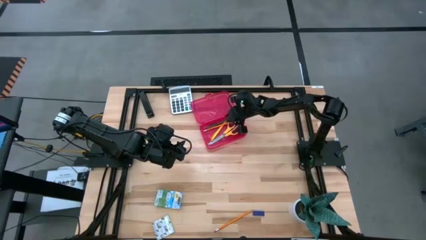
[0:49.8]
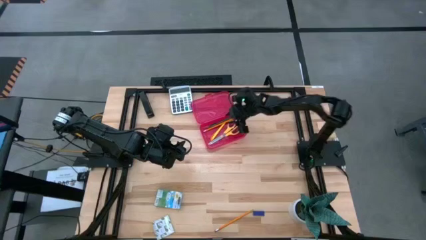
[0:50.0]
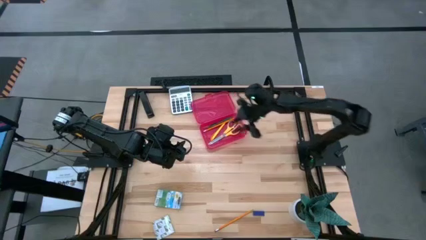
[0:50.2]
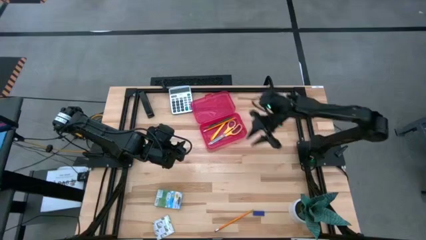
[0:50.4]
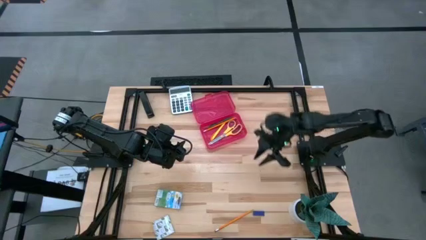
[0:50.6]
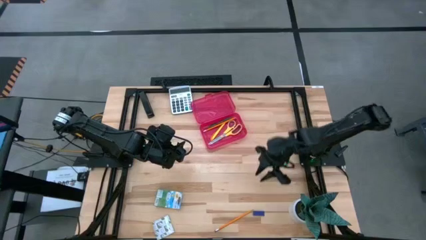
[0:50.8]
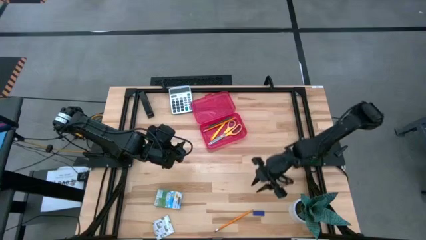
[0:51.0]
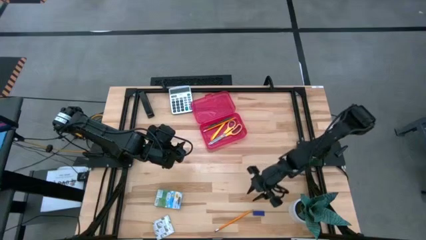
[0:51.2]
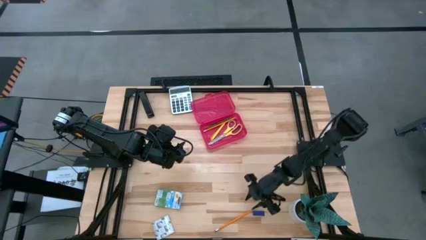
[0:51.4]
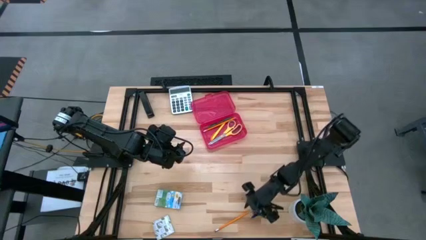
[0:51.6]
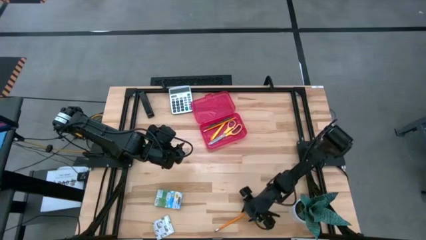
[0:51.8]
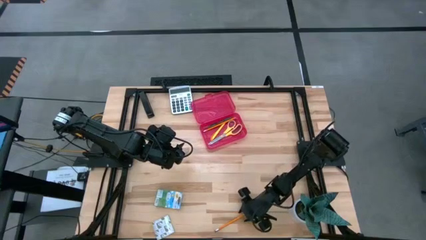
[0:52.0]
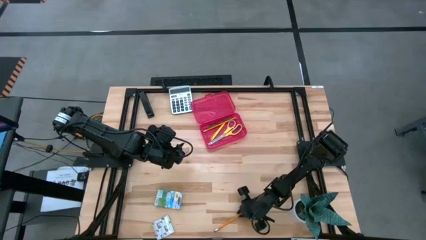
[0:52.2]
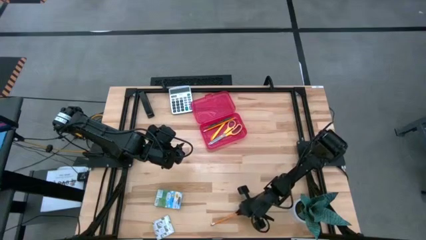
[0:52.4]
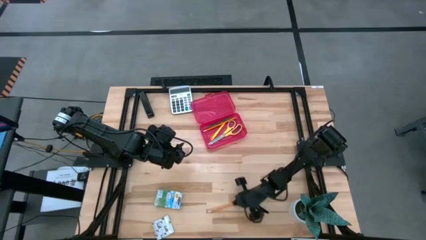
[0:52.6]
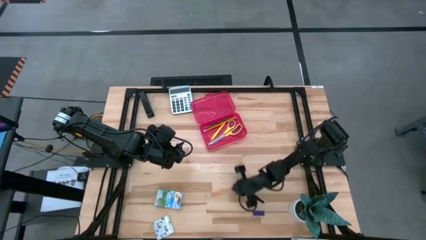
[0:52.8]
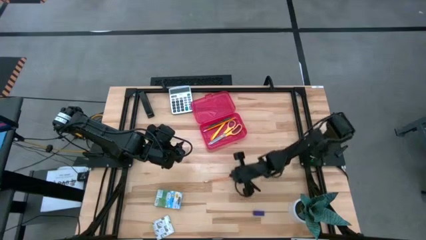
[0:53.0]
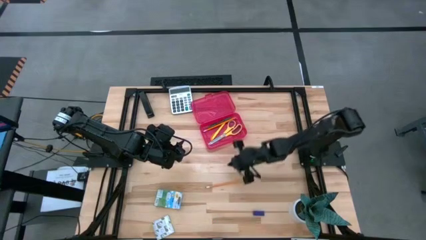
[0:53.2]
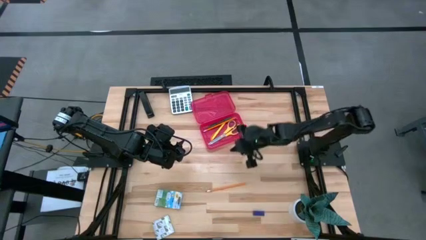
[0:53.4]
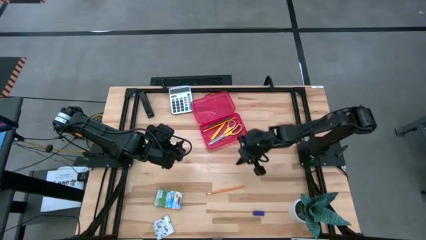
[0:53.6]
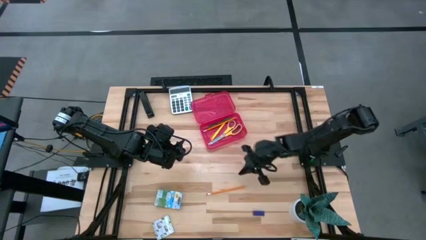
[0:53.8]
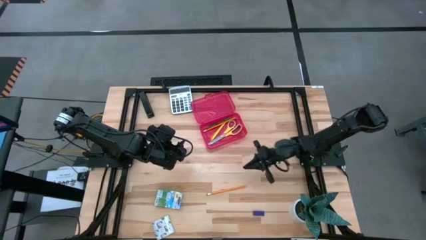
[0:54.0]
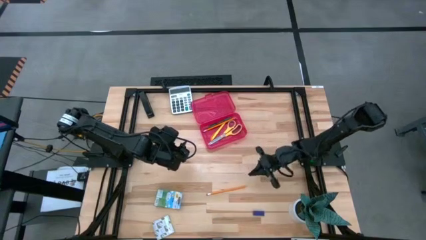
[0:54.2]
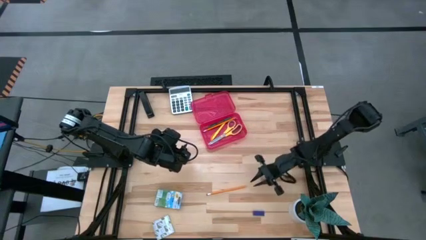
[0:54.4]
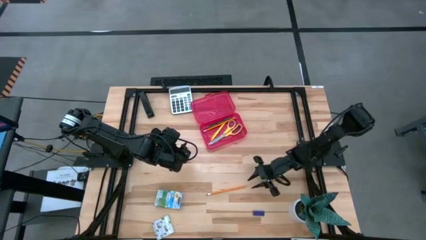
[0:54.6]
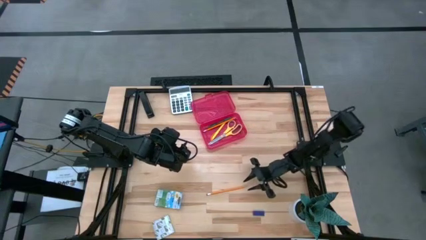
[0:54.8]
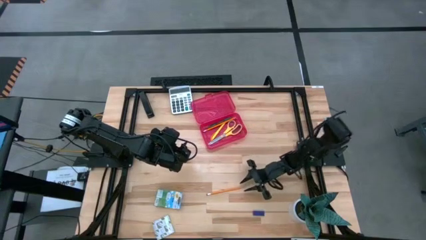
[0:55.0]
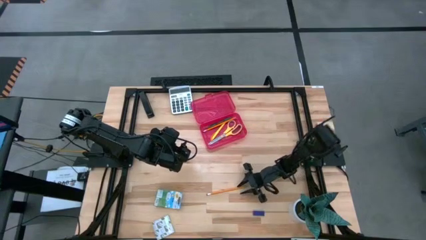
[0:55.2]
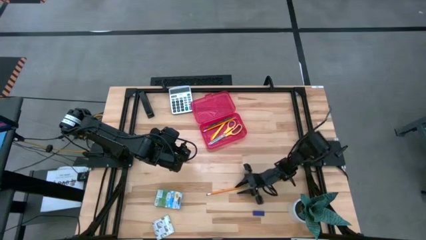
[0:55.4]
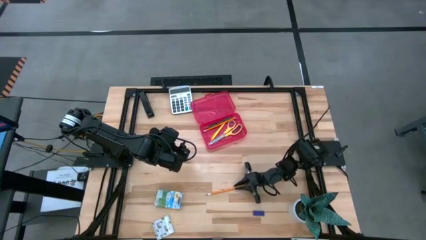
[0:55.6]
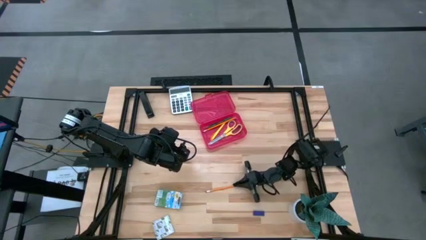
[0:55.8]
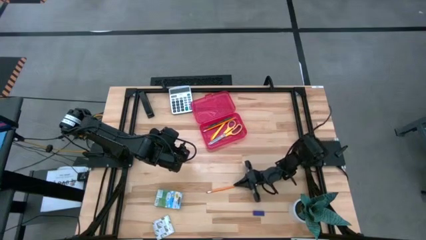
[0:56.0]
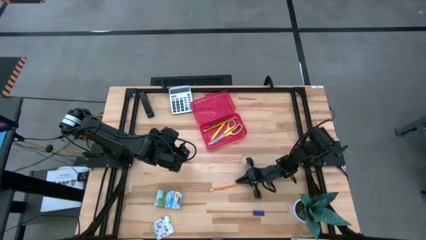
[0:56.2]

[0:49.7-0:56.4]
Task: Pack school essentials
Put the orange pencil into the red supply box

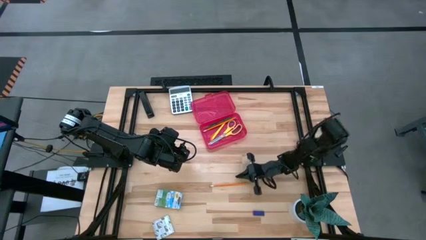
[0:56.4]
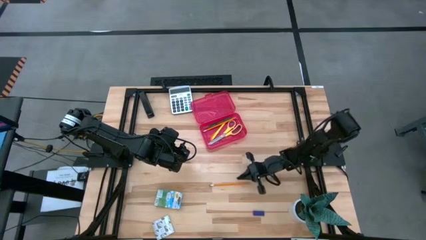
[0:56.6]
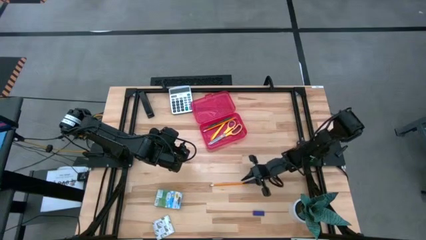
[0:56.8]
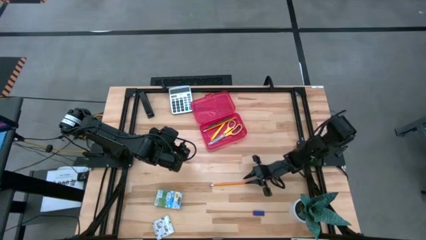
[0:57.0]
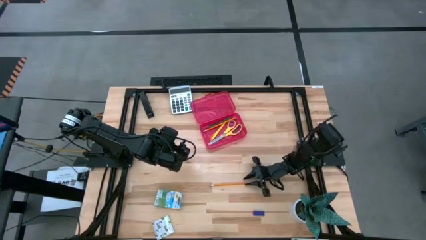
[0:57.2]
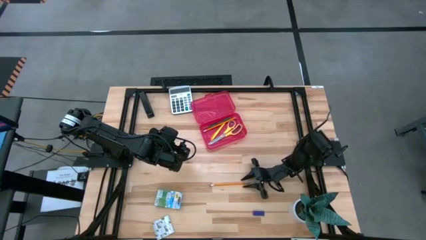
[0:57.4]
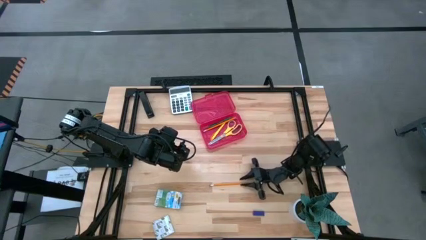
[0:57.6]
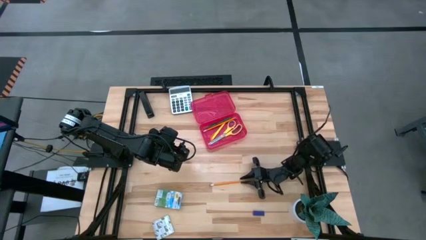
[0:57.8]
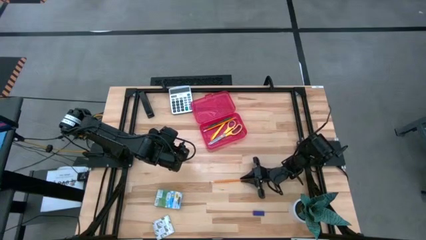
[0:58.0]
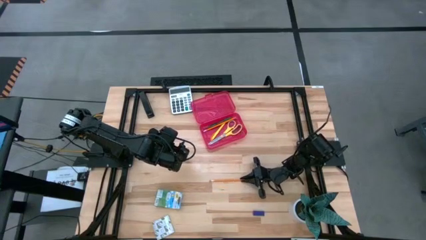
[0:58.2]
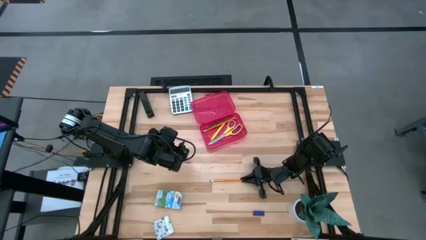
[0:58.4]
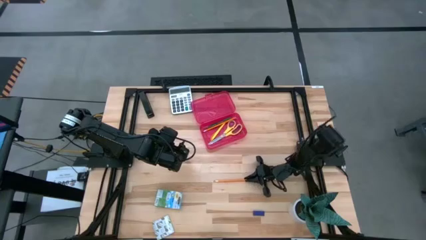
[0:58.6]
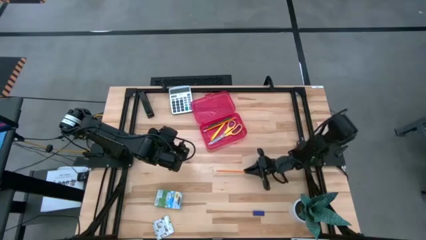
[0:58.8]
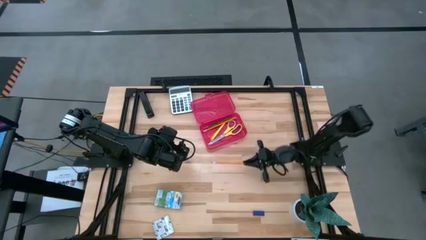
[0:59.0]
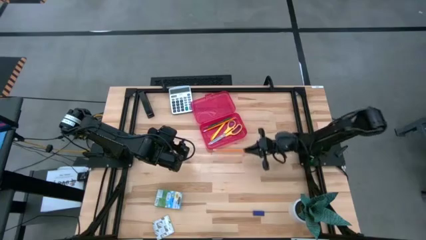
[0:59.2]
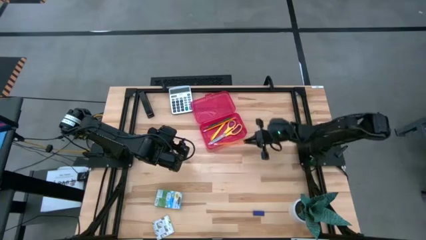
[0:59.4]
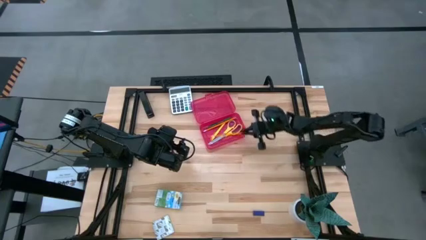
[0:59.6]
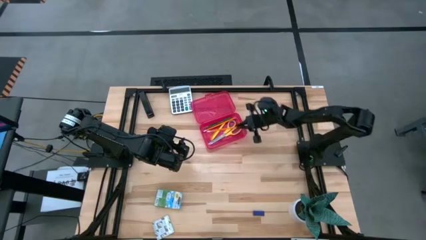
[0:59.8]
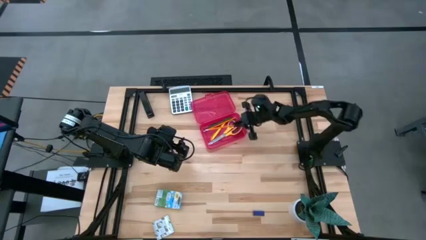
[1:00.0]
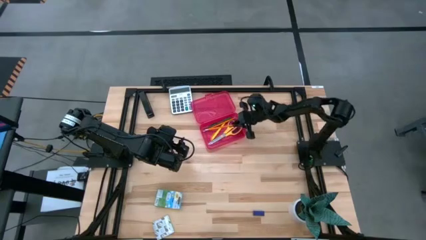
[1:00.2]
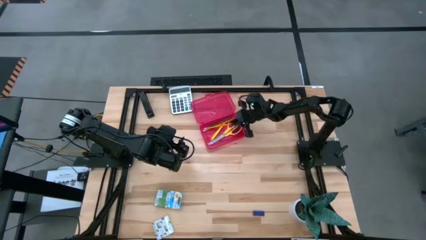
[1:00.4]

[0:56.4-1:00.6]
Put the orange pencil into the red supply box

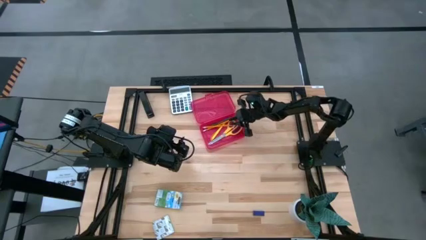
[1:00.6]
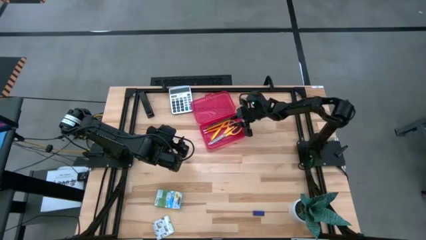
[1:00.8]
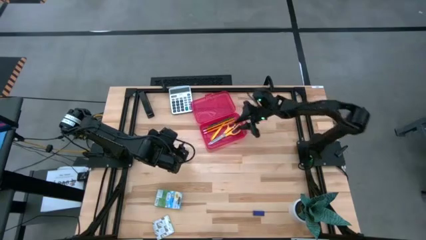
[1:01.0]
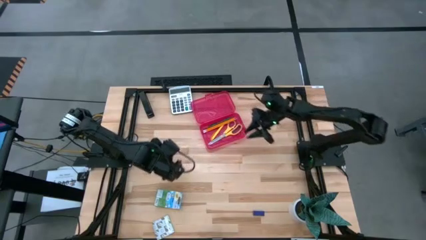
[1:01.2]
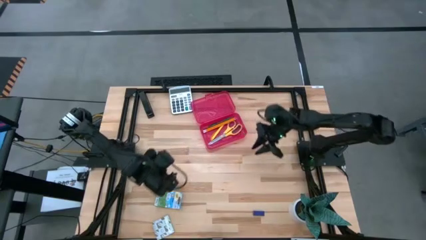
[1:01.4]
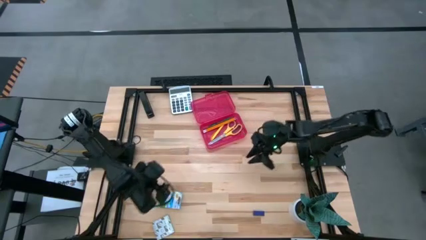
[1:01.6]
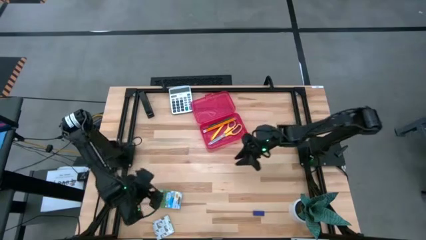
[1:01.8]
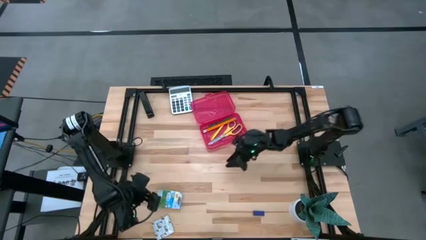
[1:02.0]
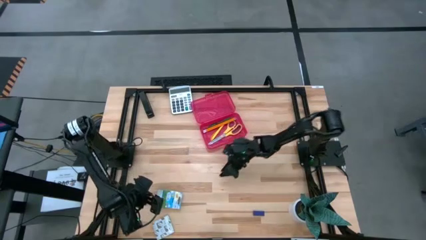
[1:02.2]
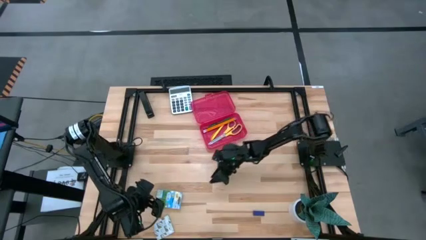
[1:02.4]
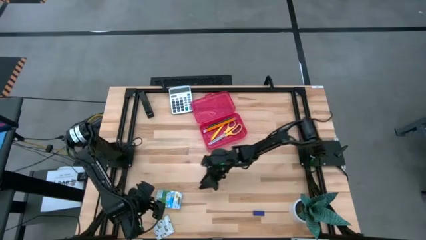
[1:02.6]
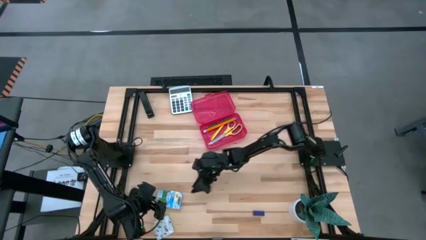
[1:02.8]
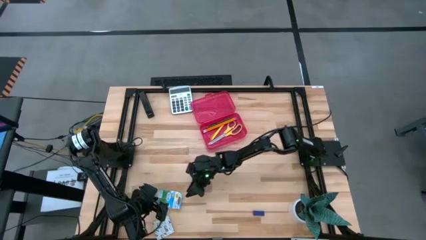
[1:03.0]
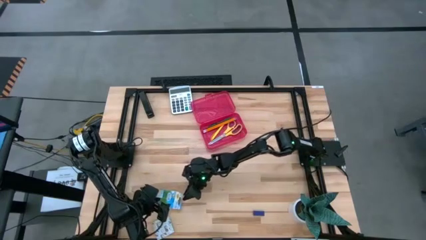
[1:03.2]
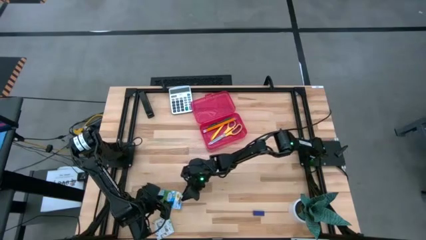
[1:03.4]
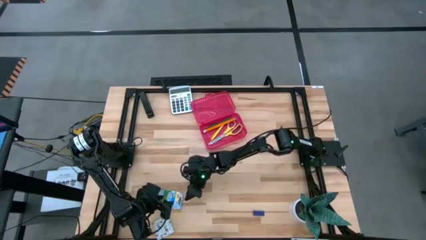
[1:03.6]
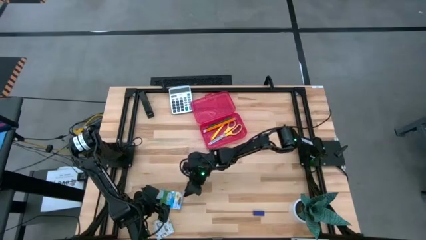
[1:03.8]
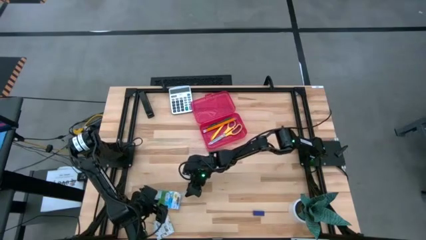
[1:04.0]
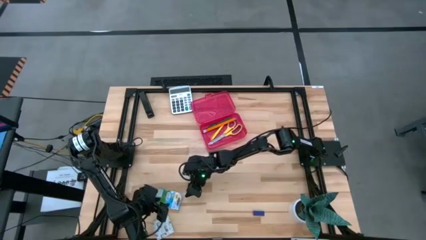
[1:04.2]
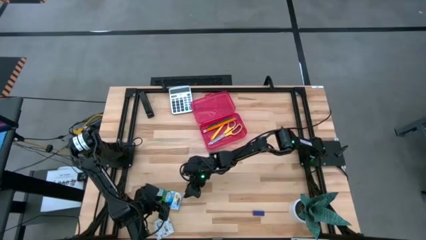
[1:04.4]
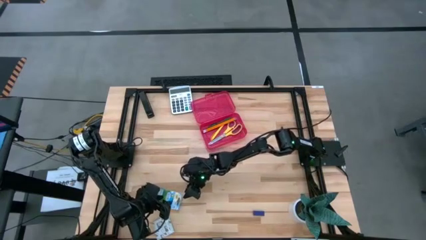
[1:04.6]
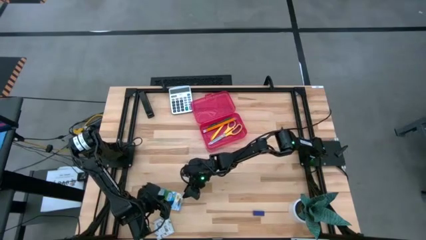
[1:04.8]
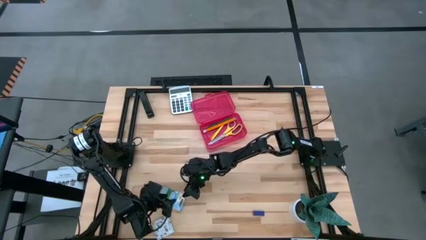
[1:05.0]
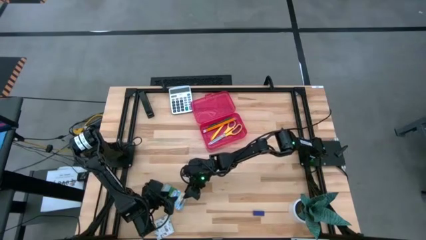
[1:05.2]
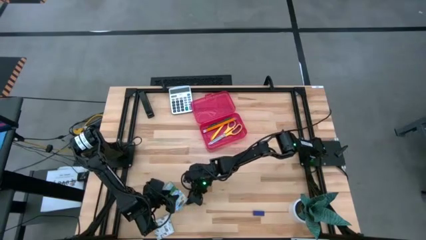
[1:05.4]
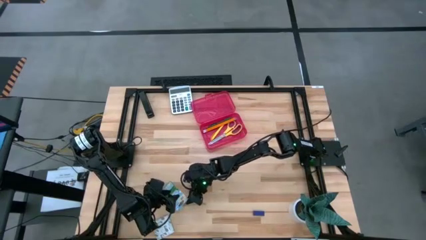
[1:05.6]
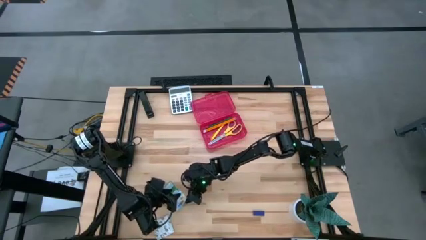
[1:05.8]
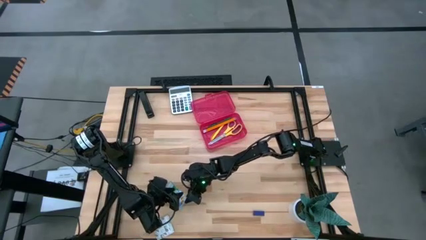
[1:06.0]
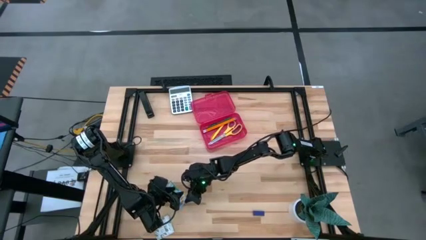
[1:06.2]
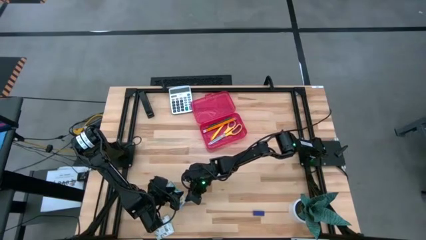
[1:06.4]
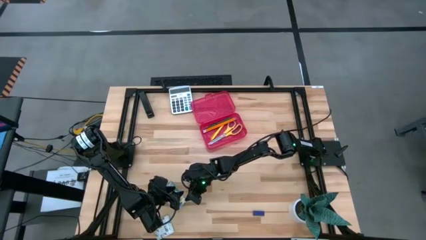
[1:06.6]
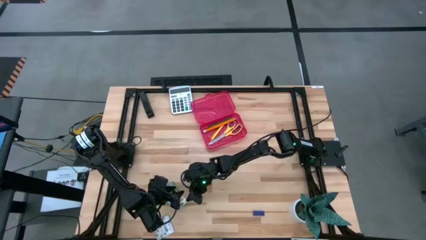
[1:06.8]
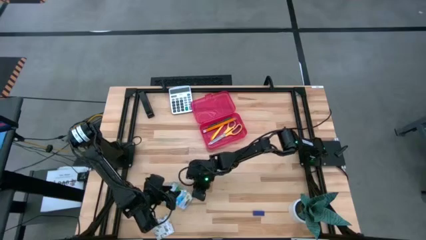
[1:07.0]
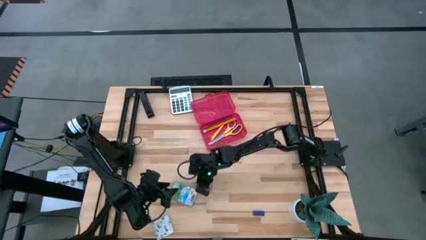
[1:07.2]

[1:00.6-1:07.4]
Put the orange crayon box into the red supply box
